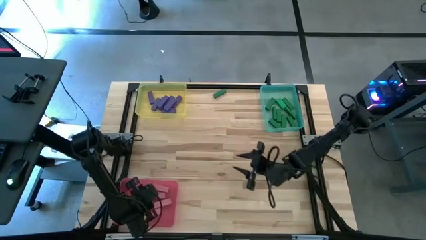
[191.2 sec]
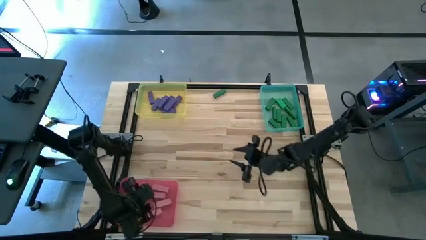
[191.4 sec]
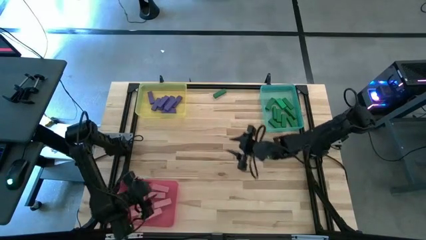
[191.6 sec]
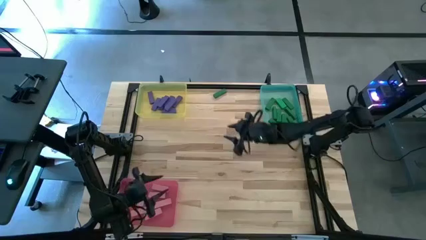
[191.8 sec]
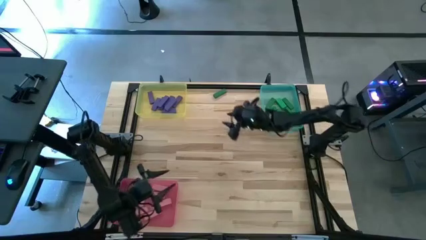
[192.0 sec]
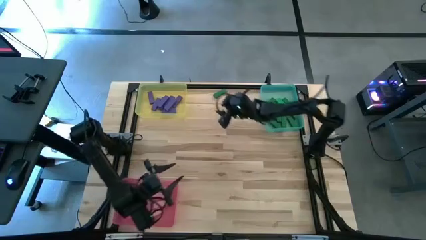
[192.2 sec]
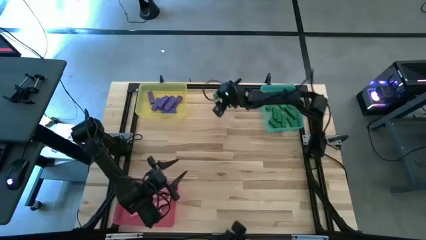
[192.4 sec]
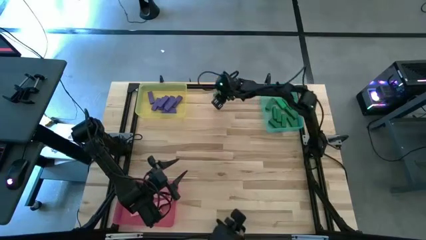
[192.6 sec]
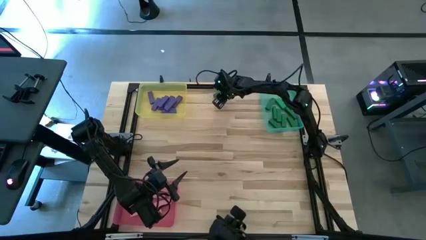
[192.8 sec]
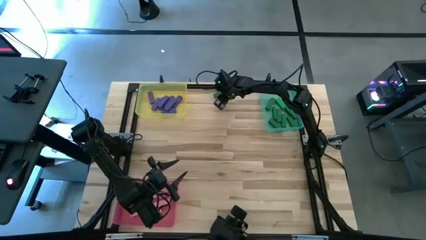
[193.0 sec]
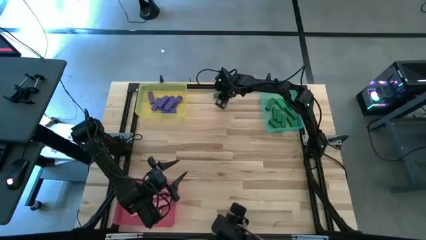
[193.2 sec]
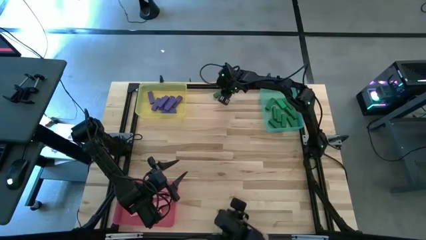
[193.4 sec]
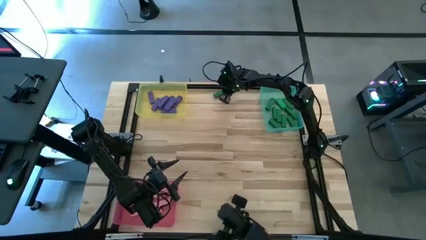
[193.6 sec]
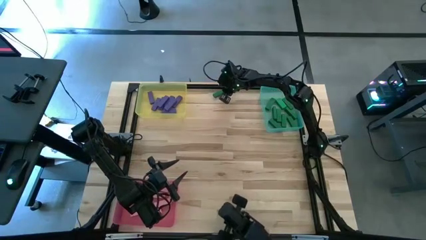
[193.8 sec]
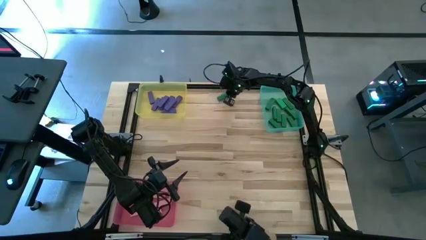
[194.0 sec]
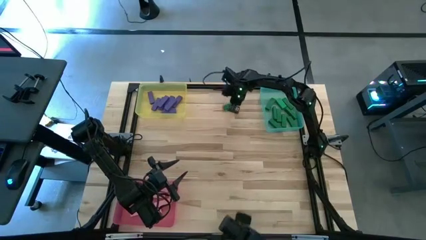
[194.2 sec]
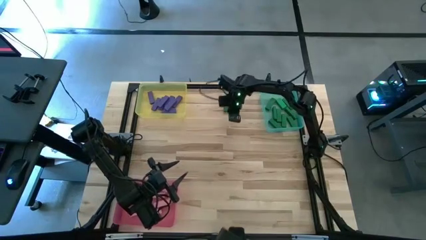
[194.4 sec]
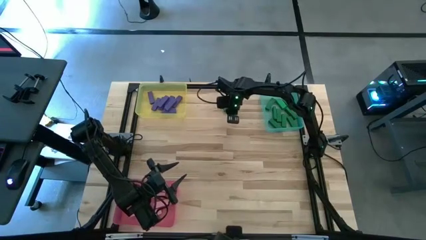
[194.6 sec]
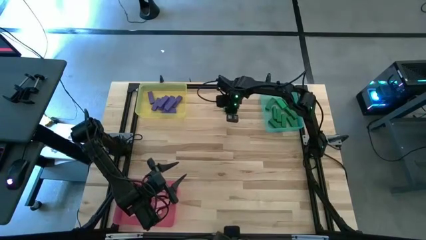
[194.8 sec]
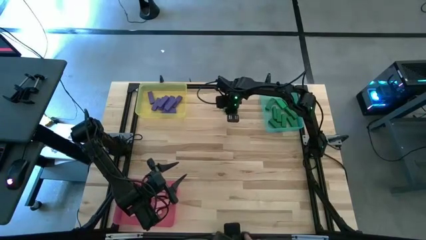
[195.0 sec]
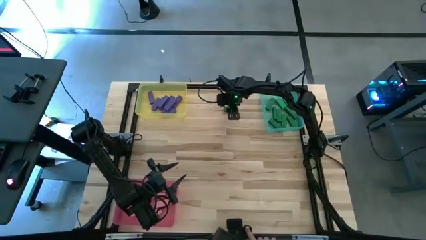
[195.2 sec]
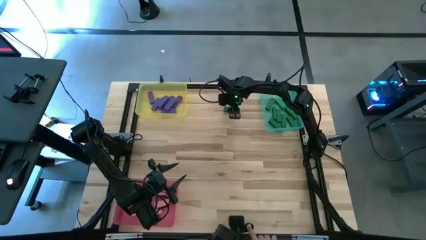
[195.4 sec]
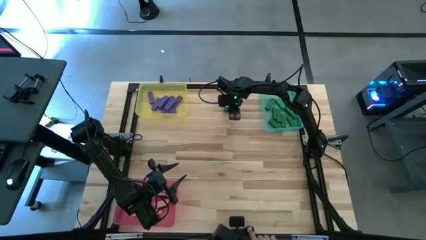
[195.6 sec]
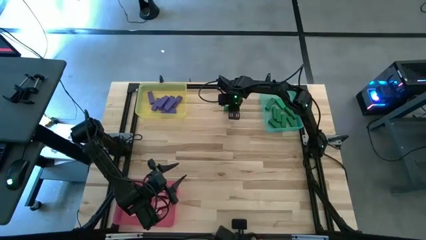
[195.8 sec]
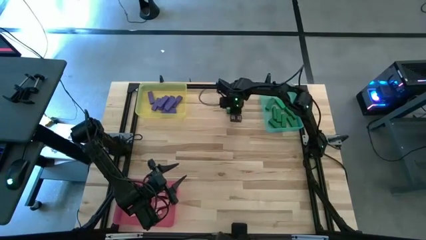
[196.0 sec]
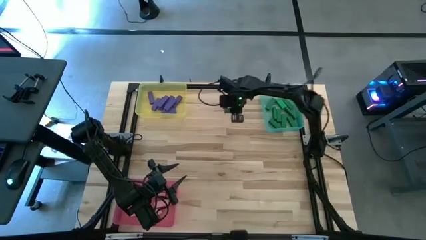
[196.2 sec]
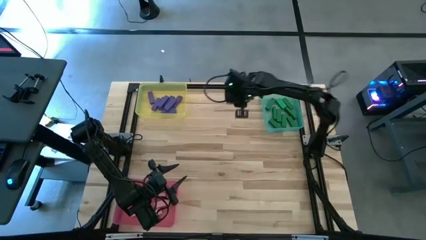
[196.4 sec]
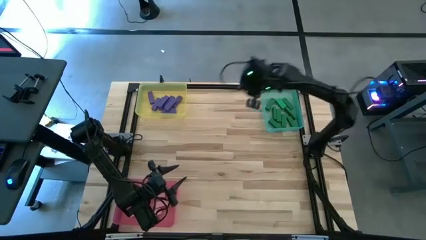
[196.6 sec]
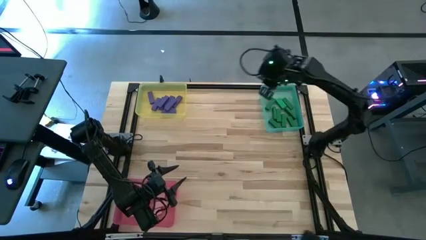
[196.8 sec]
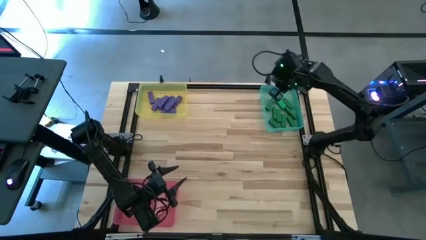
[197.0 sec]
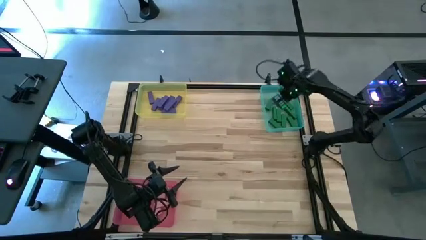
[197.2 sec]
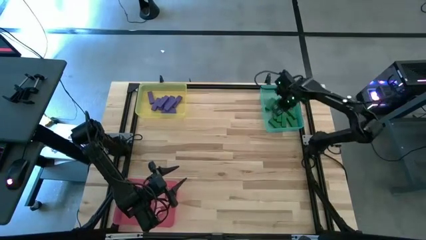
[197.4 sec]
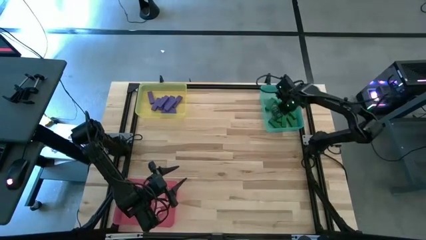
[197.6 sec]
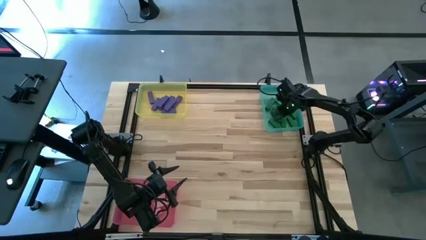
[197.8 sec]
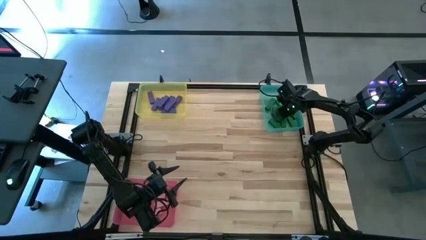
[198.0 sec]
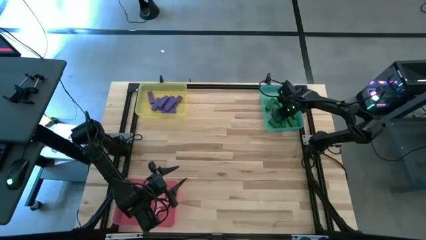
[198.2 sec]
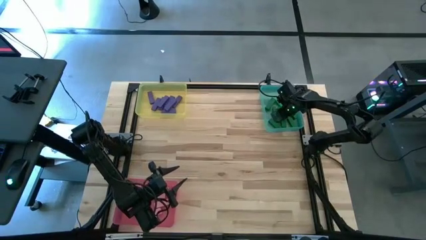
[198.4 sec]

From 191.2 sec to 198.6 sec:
Task: Sort blocks
Put the green wooden block into the green bin

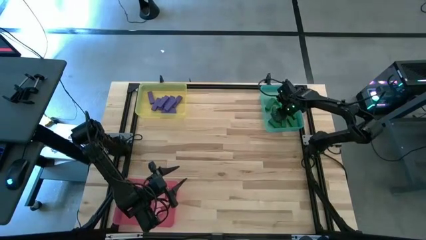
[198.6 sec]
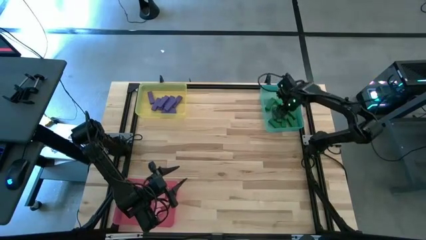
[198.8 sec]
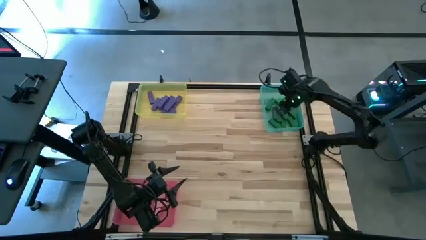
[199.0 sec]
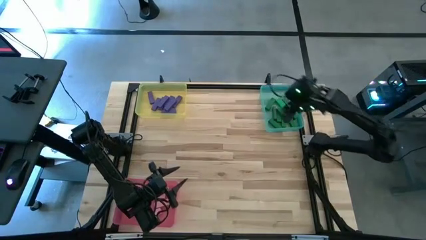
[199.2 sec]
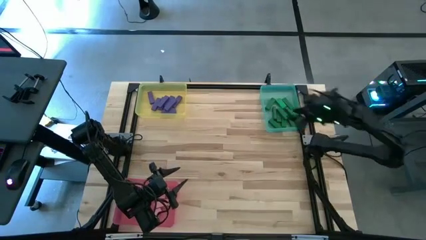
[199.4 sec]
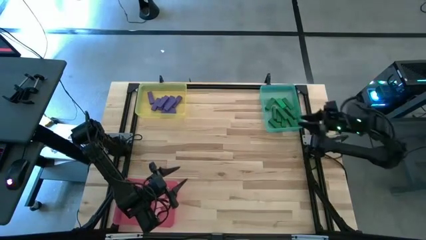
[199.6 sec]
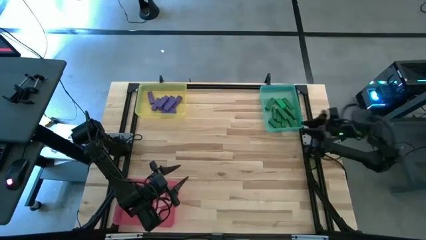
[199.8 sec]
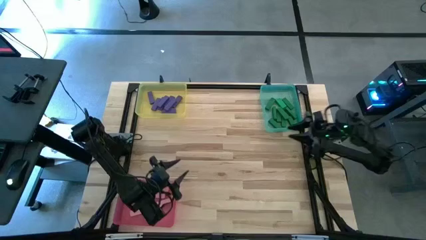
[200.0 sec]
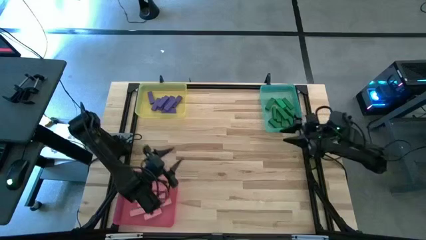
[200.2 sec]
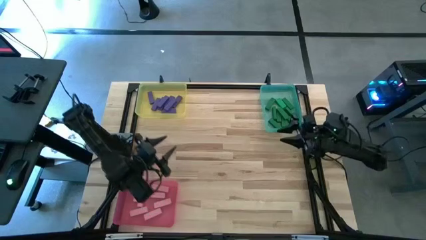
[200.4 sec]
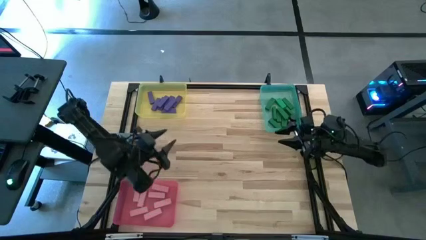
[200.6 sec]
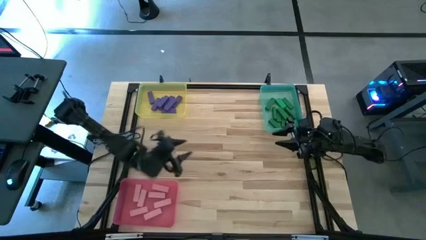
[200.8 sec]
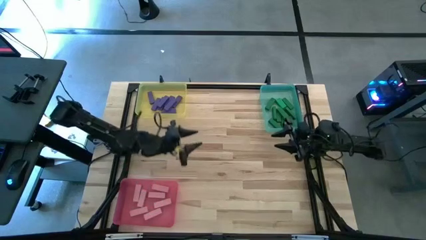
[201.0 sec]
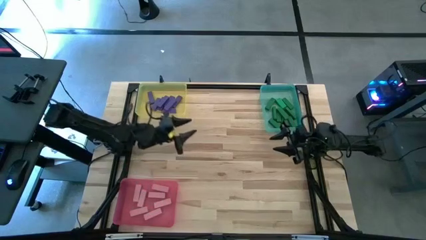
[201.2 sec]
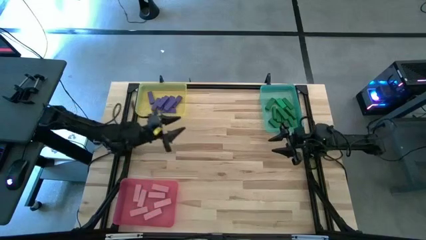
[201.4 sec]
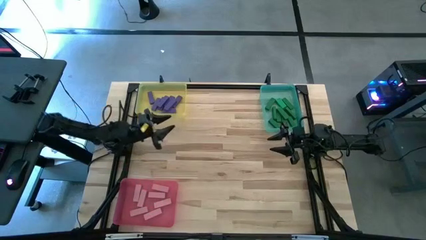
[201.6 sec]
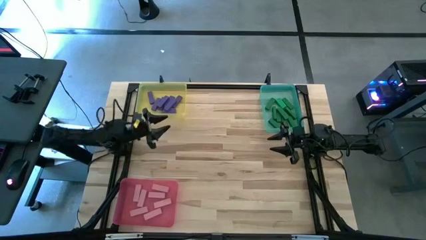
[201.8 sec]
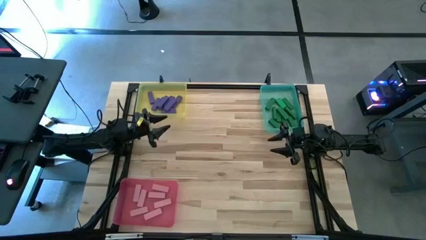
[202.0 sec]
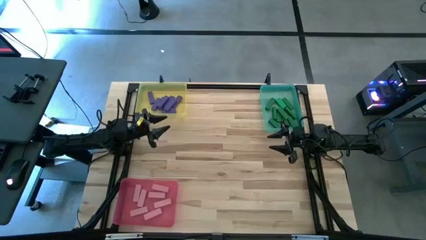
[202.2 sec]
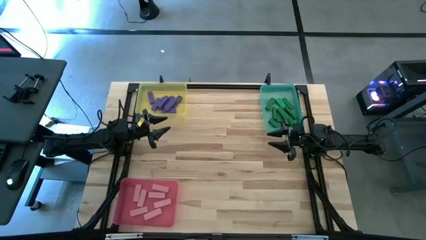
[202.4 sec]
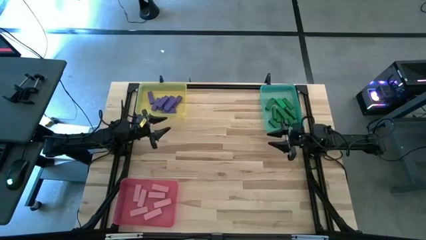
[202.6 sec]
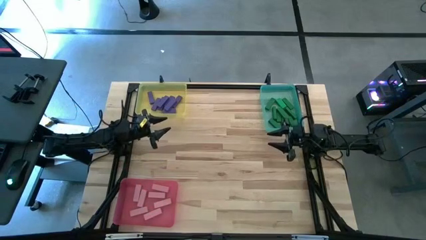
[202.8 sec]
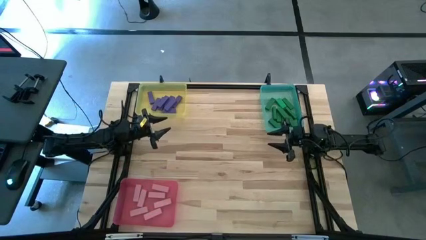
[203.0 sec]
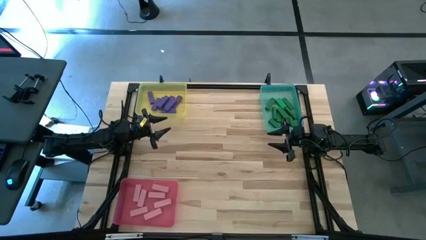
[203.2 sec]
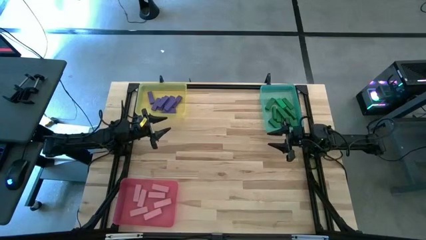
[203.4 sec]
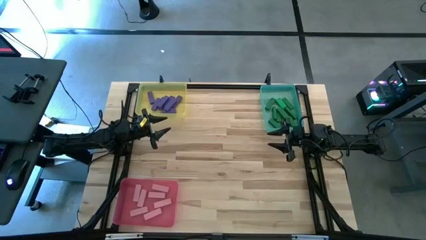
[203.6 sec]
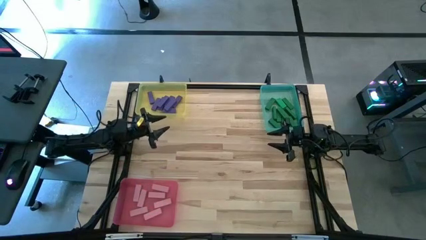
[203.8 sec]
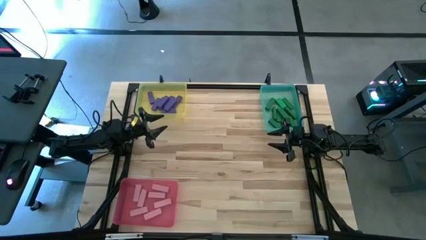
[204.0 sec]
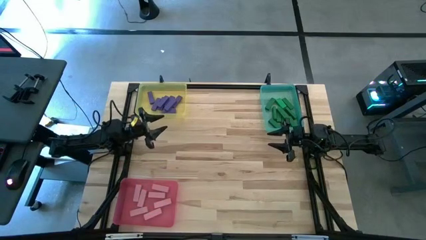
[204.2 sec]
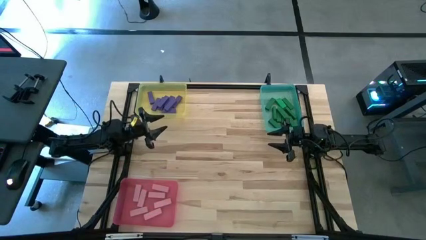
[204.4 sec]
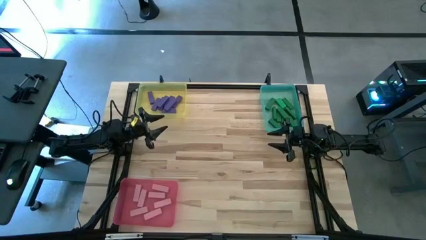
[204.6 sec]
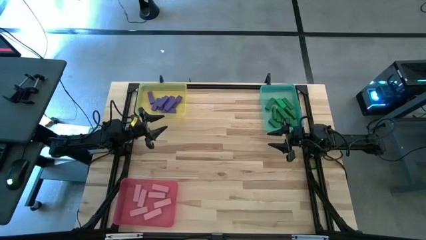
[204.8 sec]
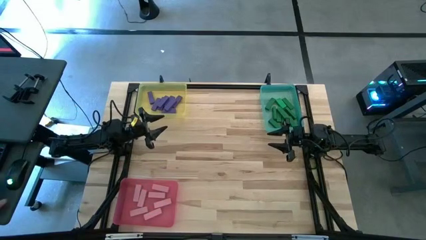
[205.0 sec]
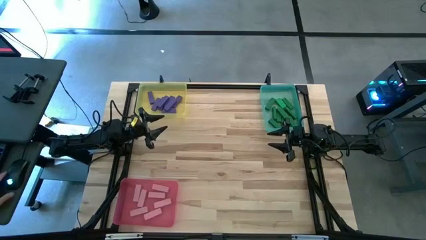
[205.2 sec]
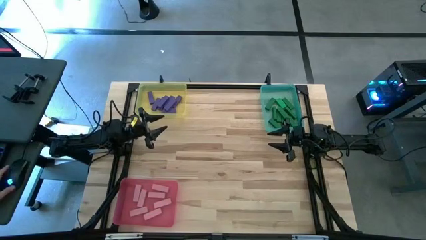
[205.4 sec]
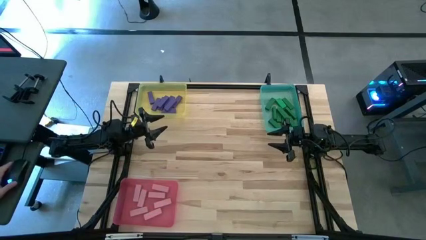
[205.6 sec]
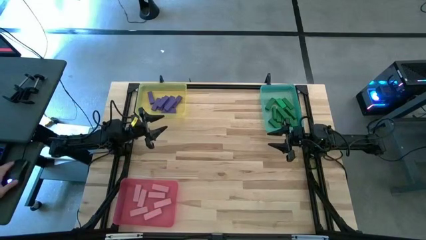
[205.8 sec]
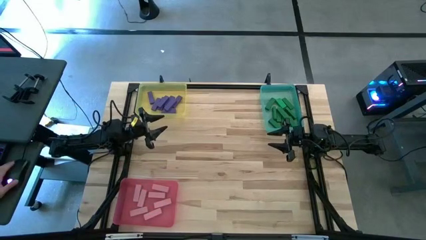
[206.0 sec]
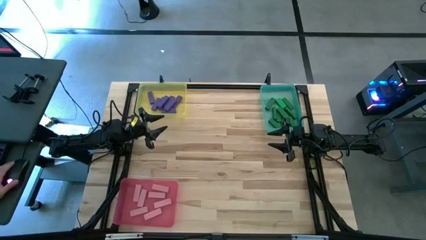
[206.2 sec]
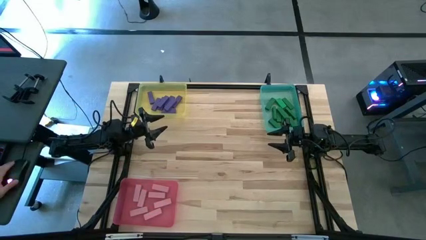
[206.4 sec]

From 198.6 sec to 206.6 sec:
Return to Home Position
